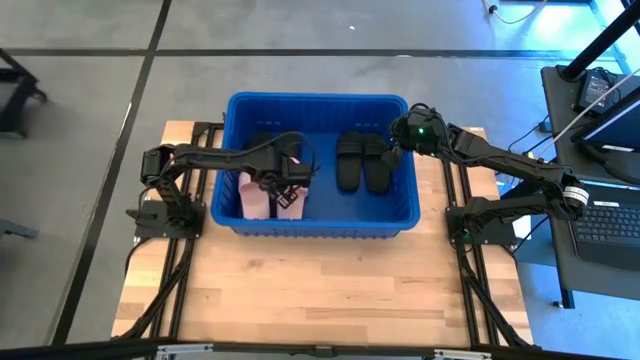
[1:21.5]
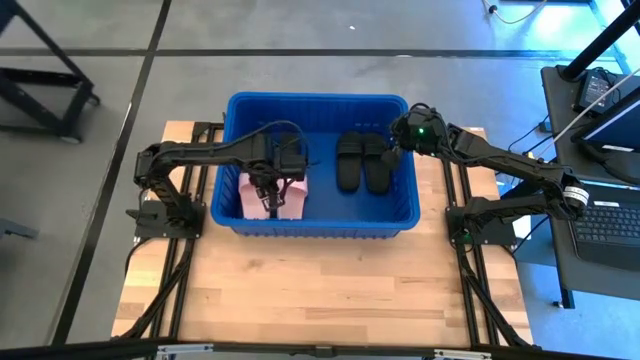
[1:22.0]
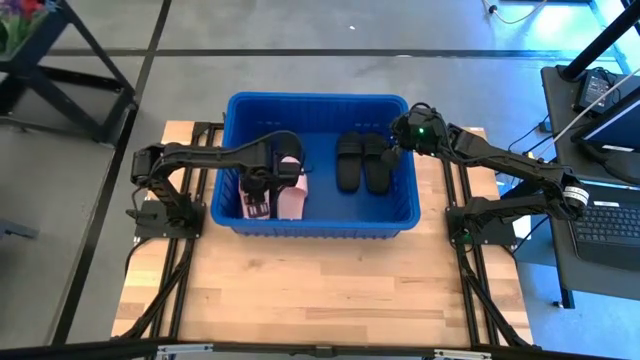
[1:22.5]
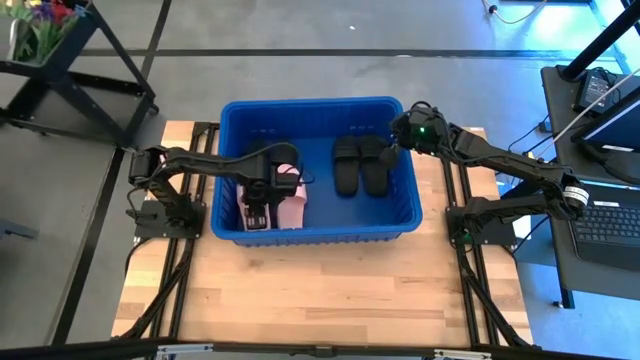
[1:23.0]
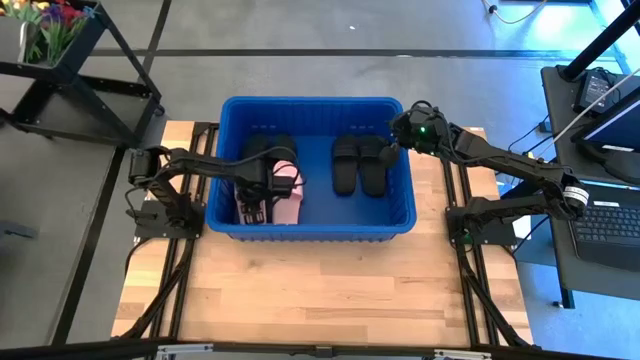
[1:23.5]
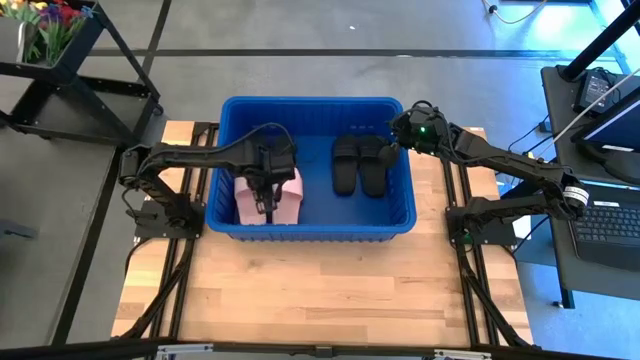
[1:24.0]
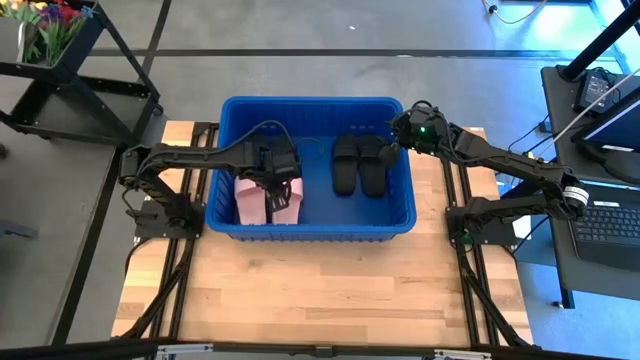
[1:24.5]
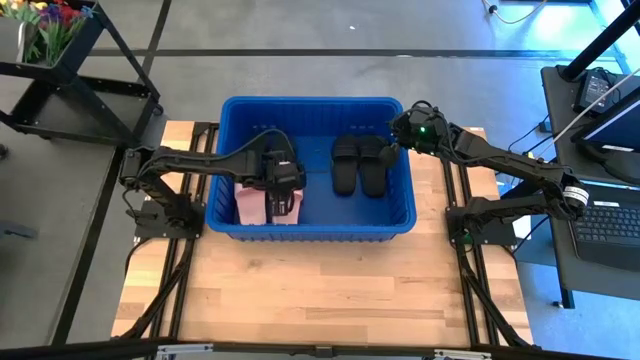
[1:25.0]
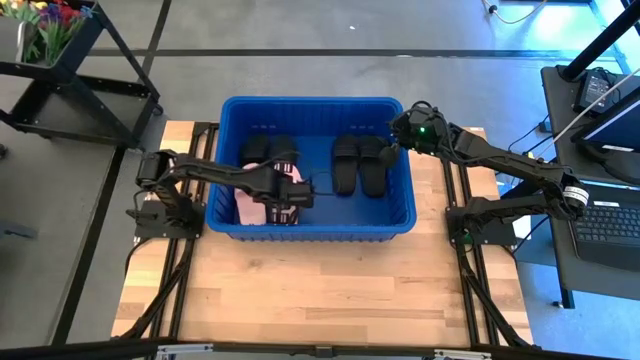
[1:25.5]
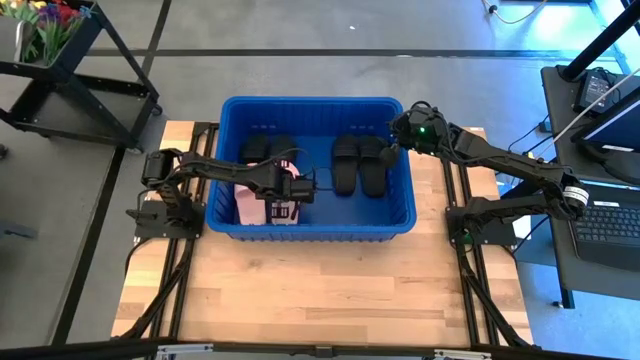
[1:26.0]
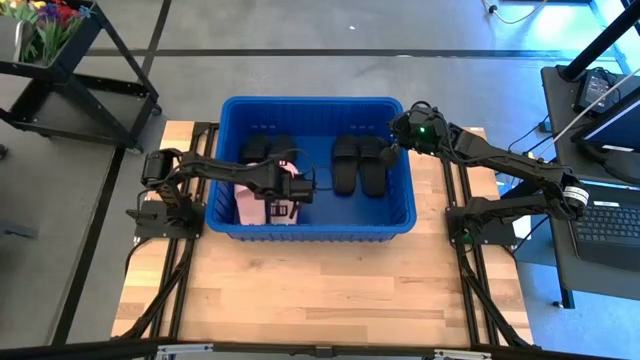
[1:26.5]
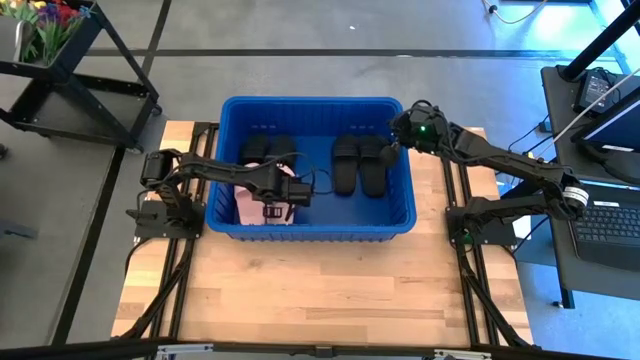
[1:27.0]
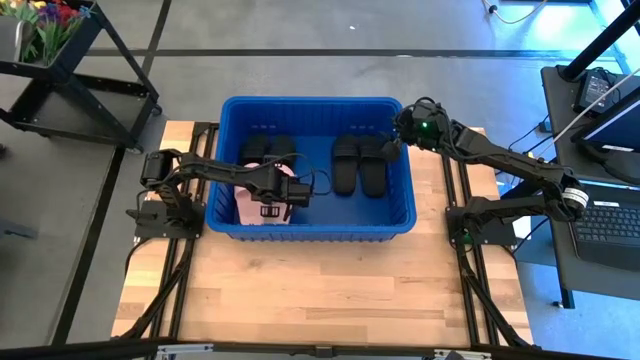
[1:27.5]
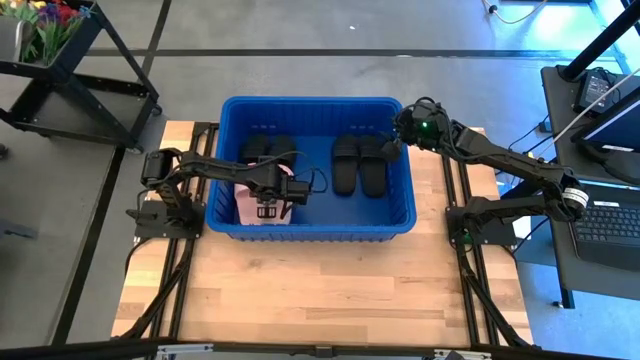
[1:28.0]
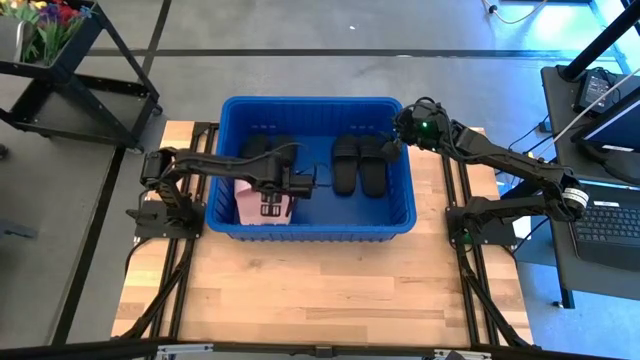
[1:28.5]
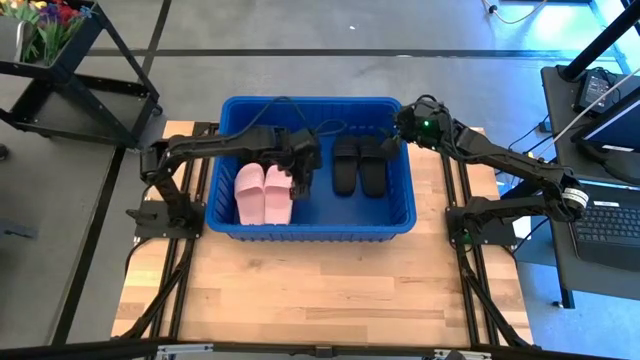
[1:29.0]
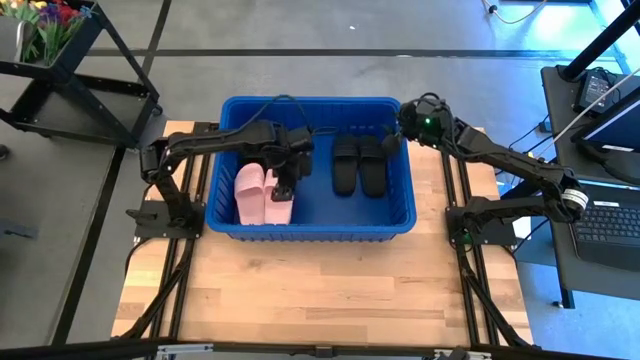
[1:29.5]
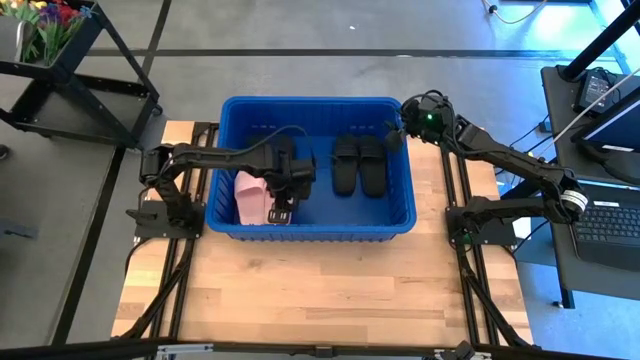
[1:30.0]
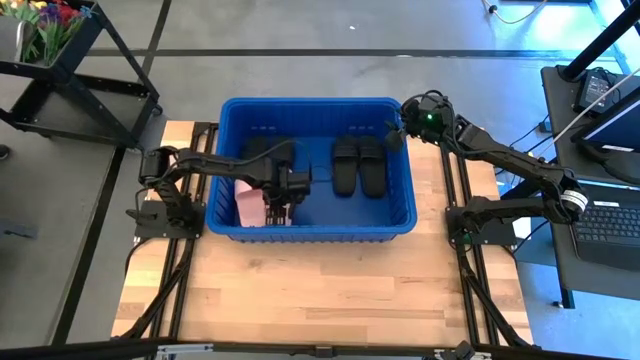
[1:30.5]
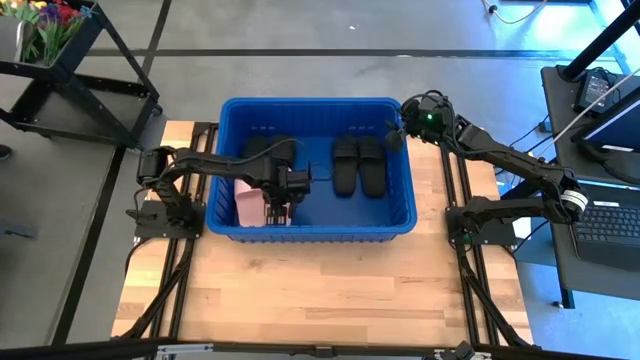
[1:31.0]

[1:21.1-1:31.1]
Task: Pick and place slides into bin
Adjust the pink slides in the organizer bin

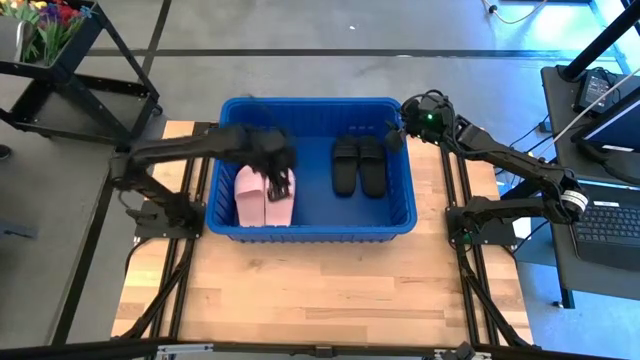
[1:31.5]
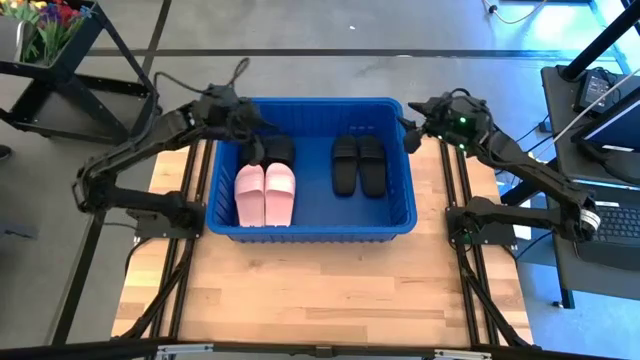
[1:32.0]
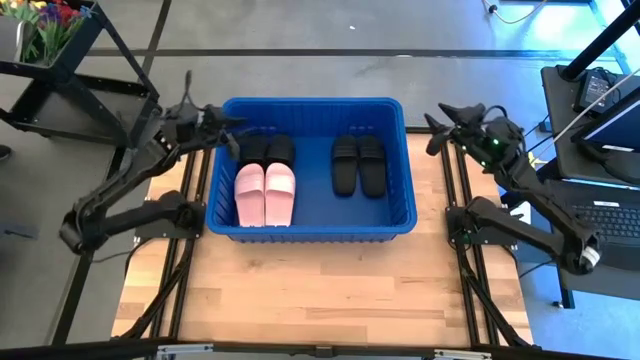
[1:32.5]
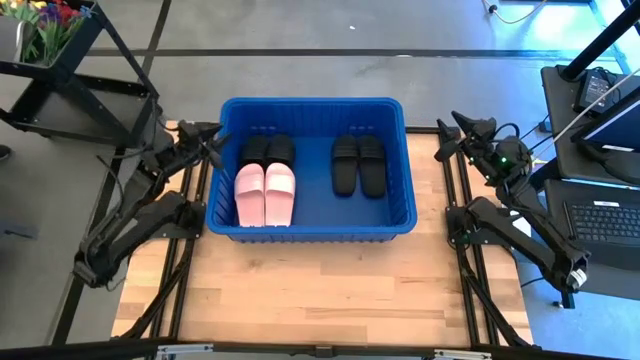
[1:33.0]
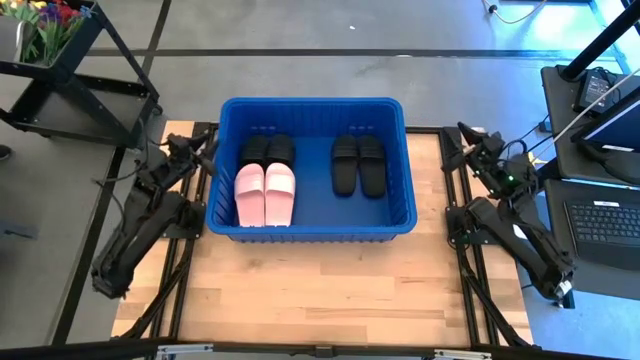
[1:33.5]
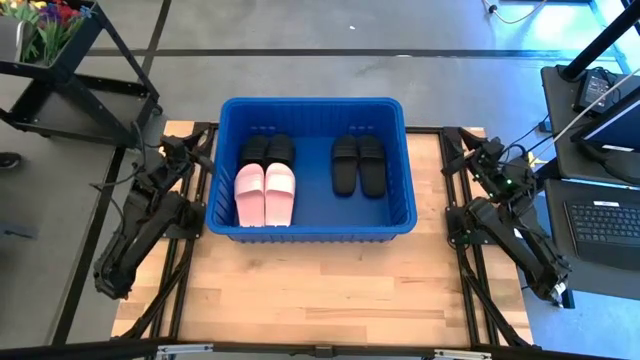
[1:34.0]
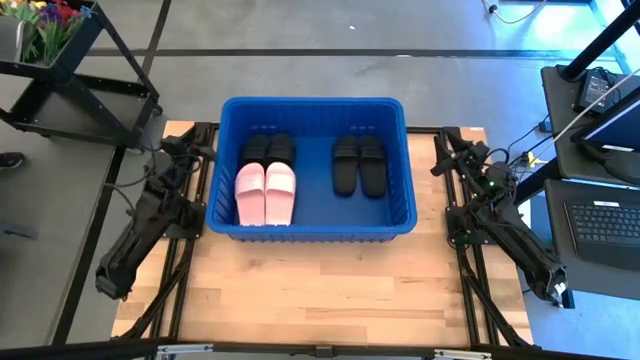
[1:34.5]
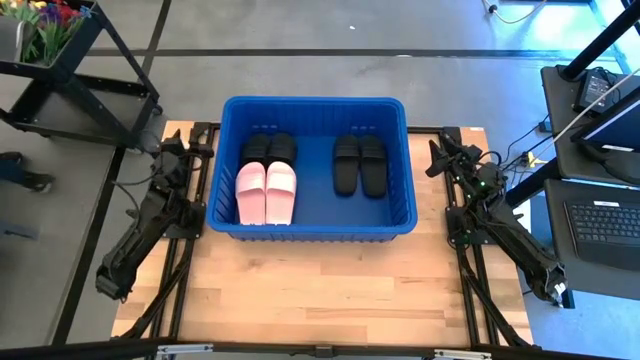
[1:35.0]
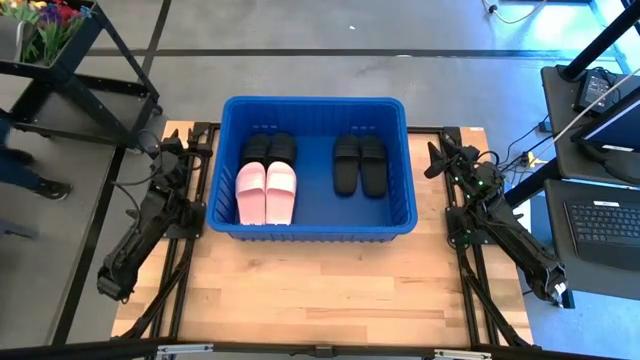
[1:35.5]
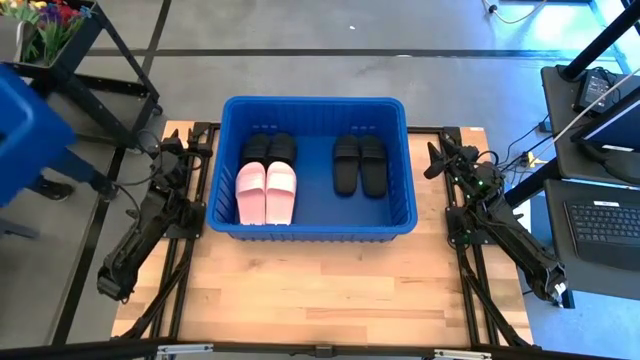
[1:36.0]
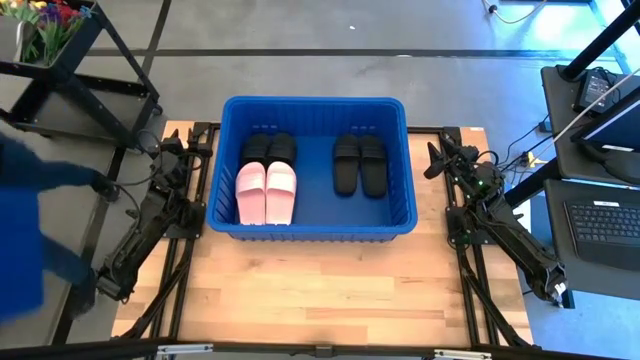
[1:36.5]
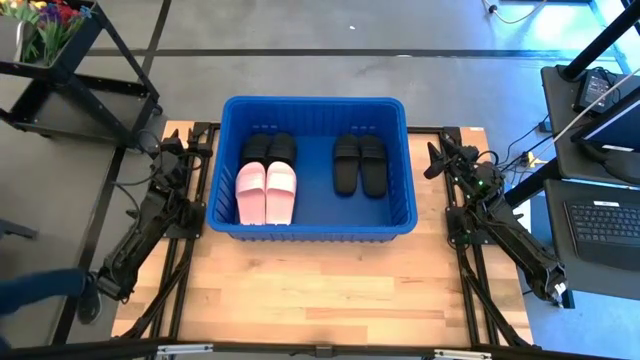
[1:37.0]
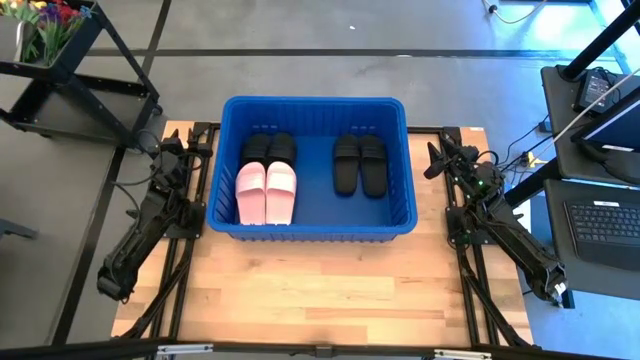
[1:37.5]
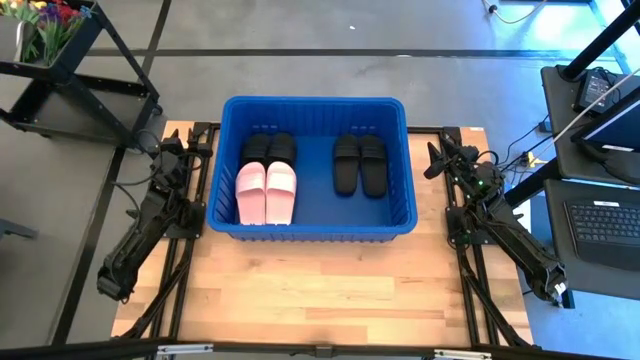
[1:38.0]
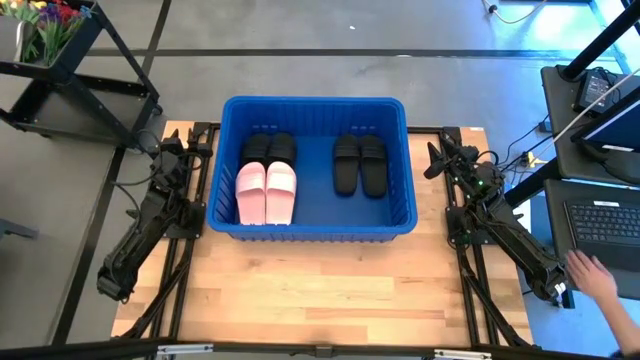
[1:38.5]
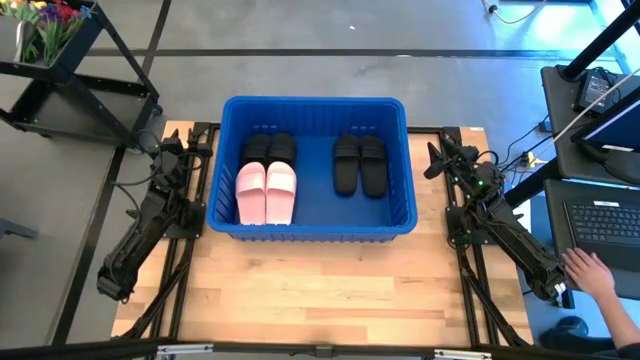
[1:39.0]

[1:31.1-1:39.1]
Return to Home Position

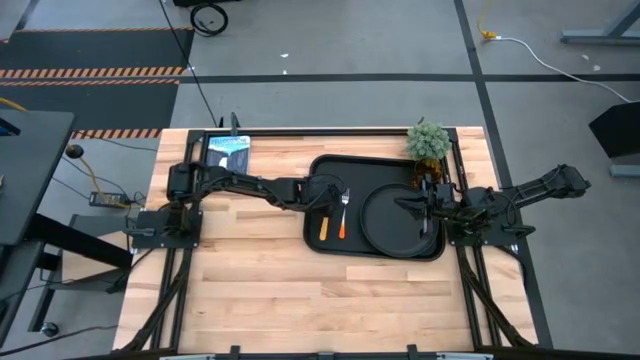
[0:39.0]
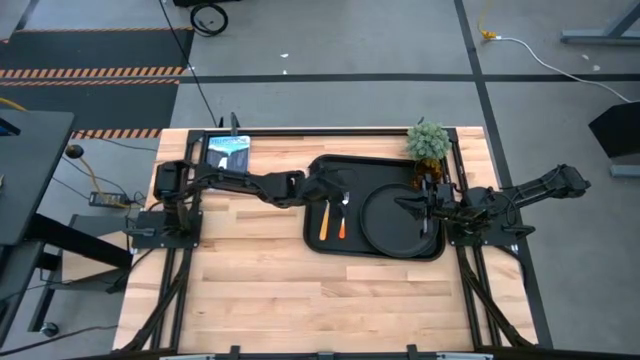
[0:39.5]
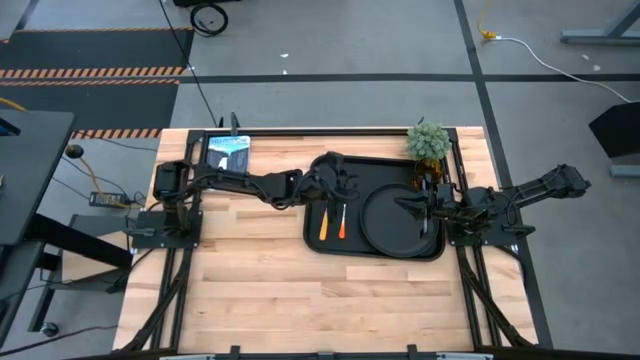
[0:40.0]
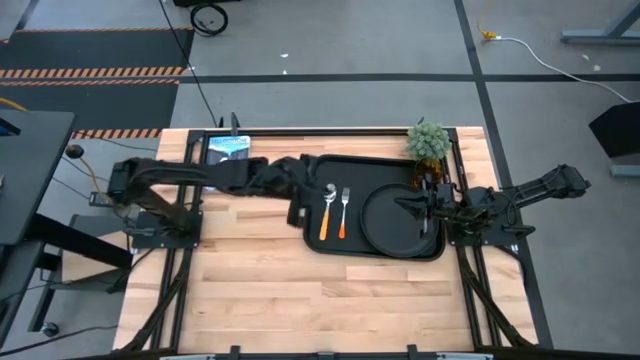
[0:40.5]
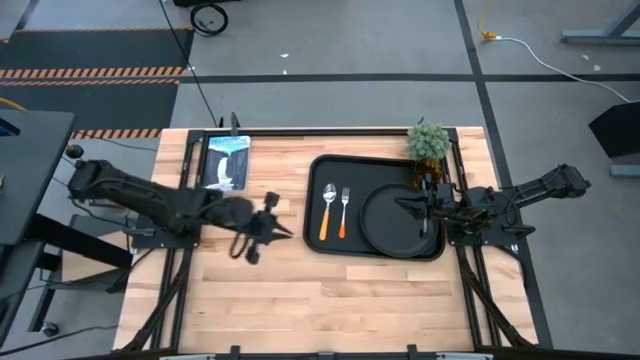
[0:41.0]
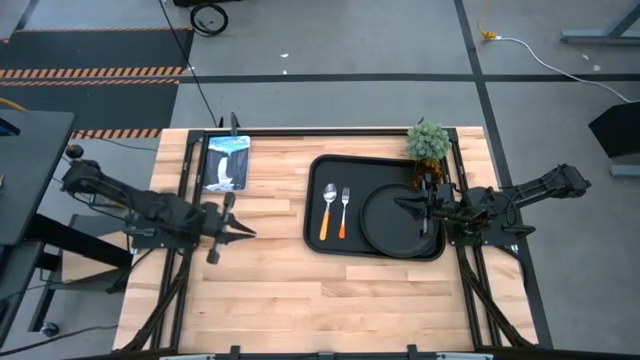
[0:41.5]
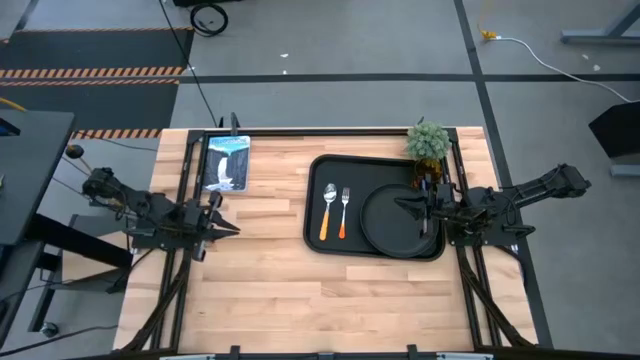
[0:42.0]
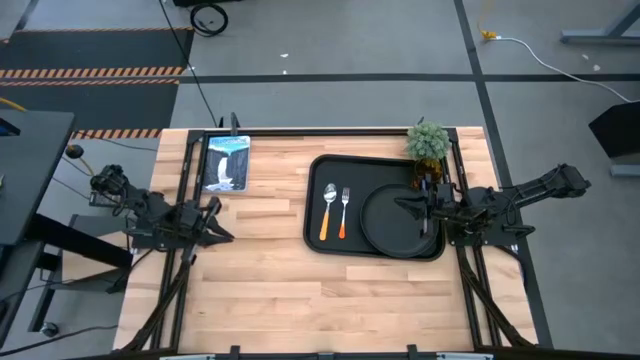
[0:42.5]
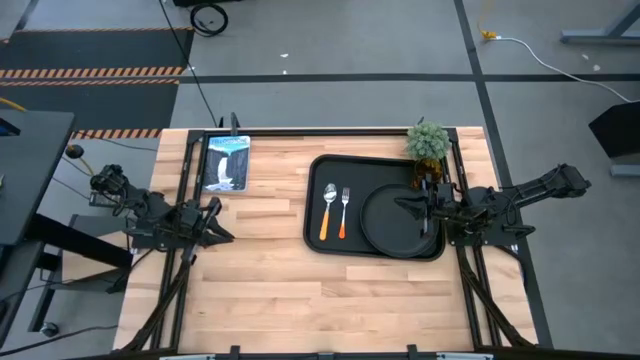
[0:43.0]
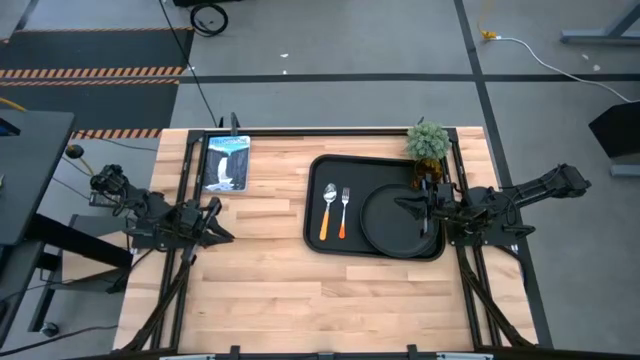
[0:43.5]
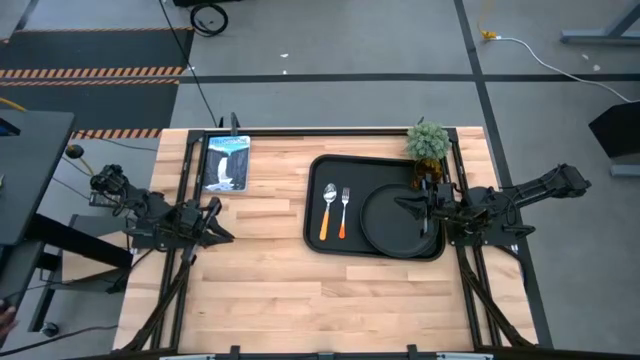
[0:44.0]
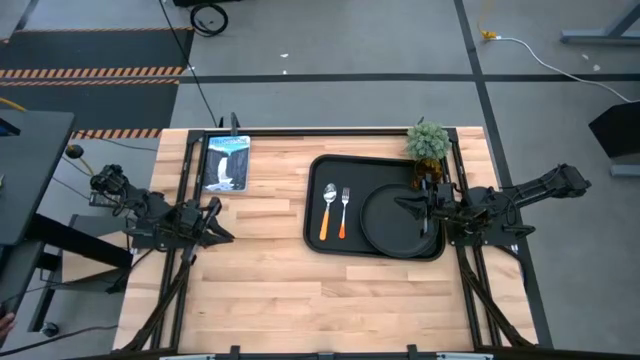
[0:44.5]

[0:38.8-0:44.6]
Task: Pick and place plate/cup/fork/spoon on tray
Return to Home Position
